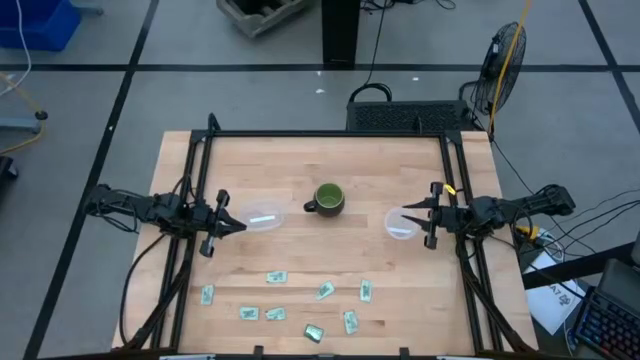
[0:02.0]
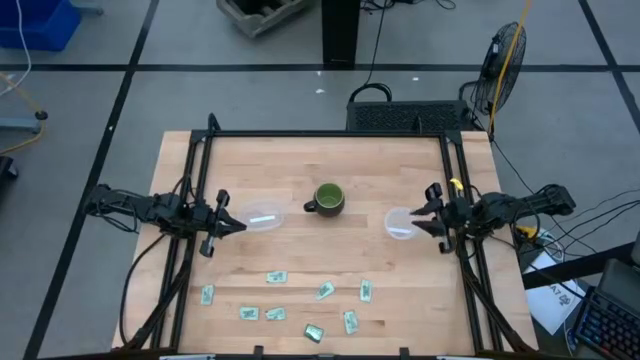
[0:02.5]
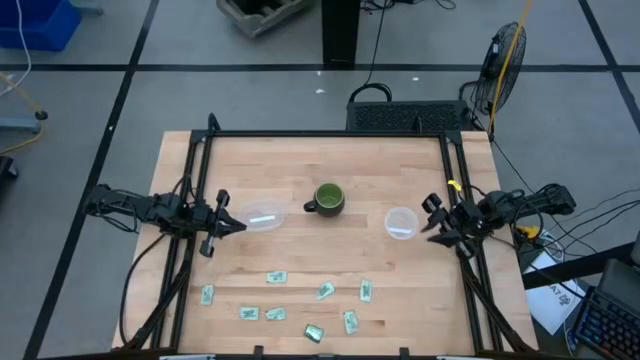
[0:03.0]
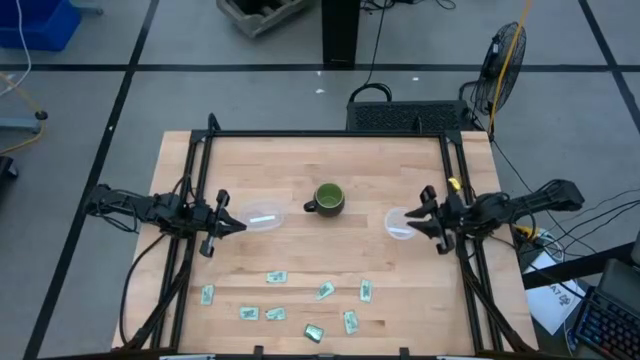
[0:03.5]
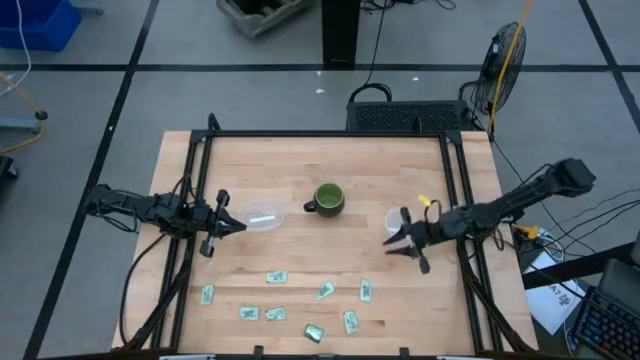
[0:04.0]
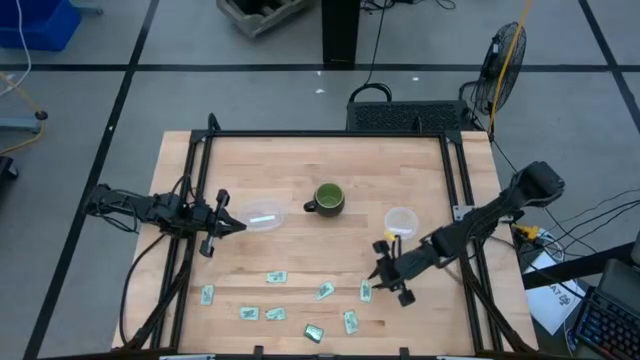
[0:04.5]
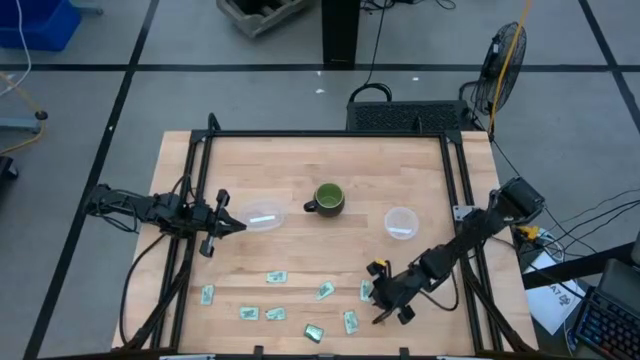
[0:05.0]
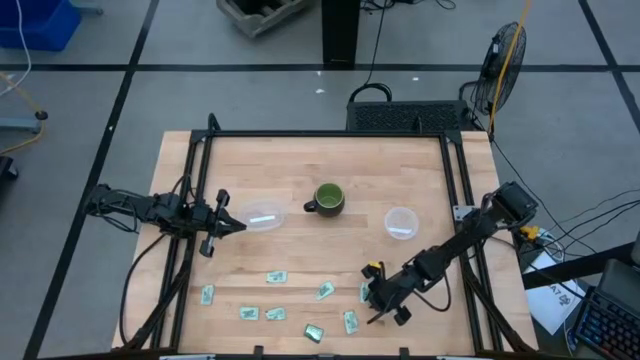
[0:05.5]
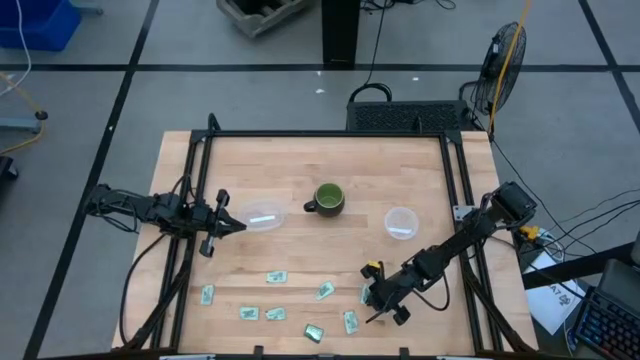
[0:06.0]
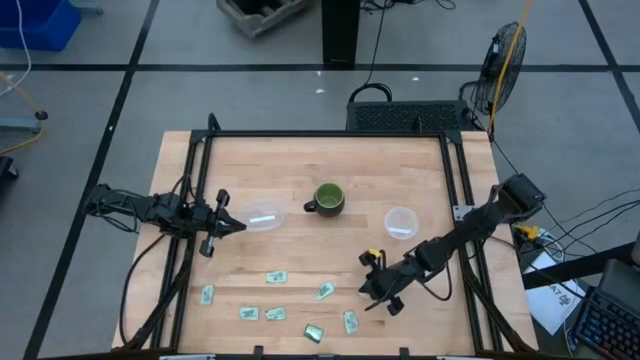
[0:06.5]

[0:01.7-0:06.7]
Task: Pick and place Stevia / Truvia into bins
Put the stevia packet into the round transparent container

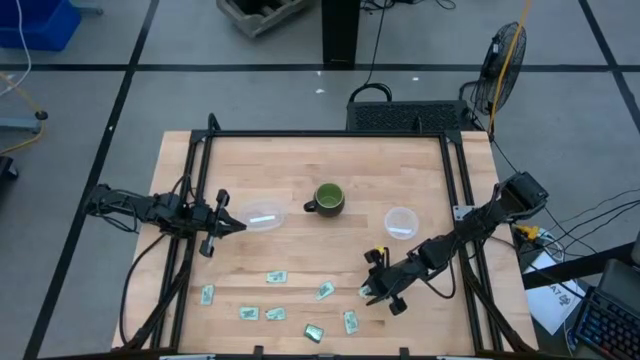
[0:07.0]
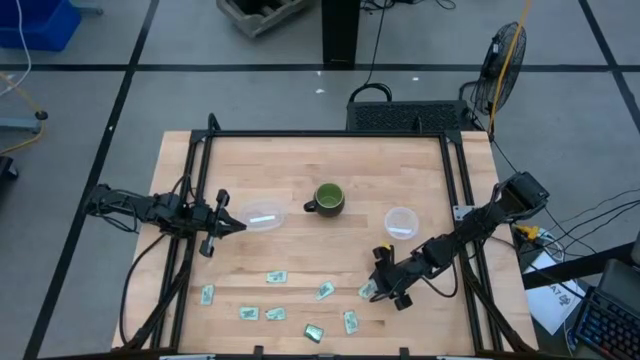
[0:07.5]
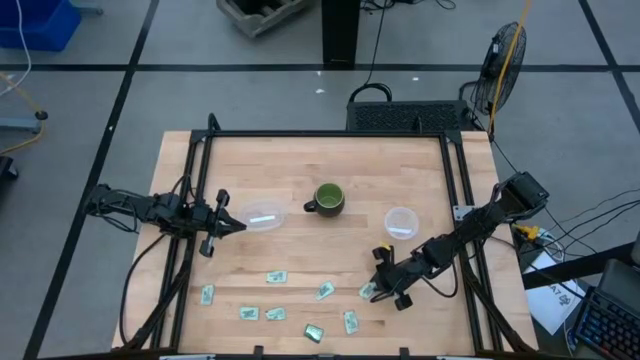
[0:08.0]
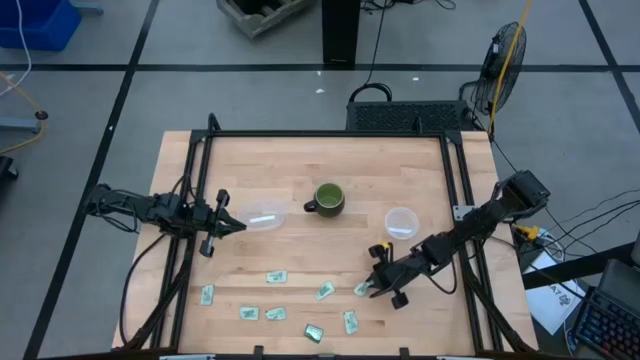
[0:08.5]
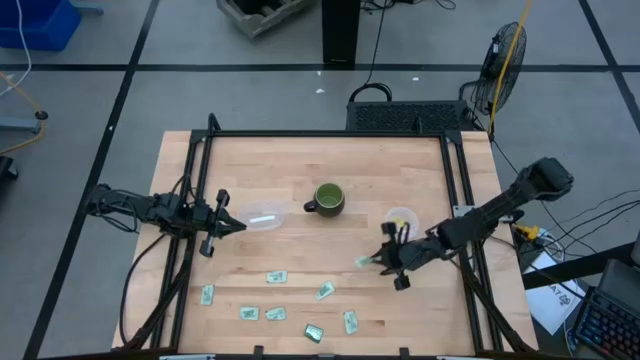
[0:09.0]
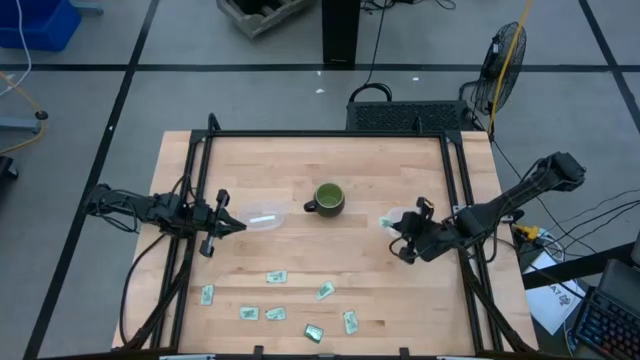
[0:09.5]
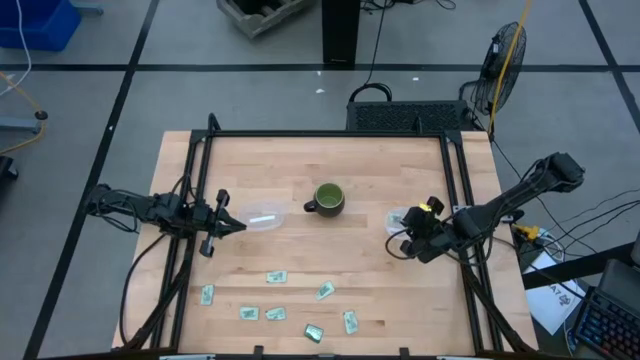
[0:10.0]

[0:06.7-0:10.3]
Put the stevia packet into the round transparent container

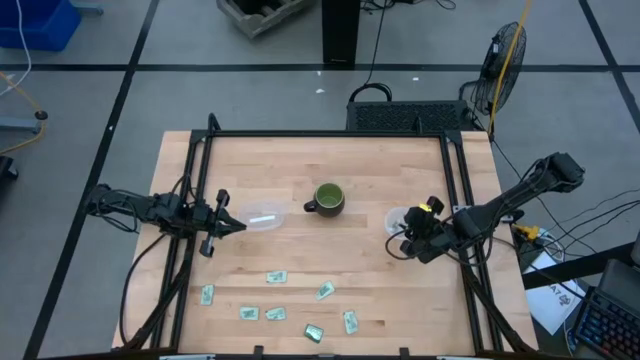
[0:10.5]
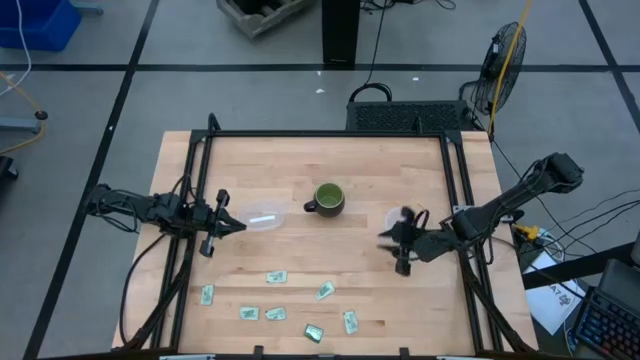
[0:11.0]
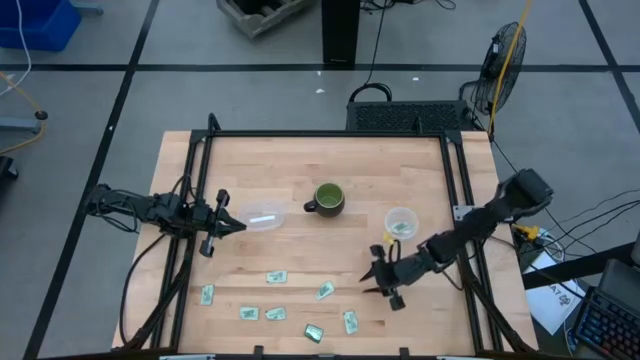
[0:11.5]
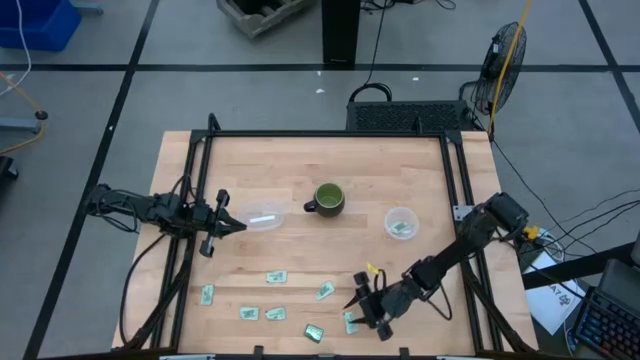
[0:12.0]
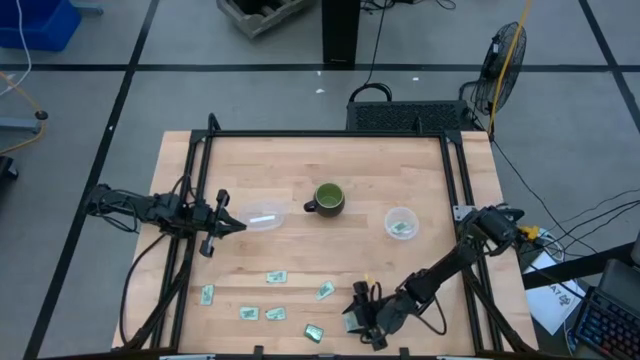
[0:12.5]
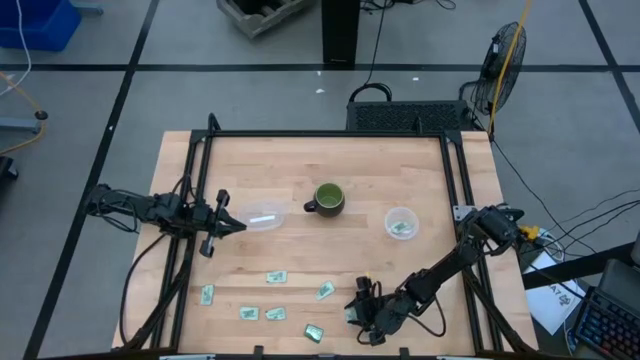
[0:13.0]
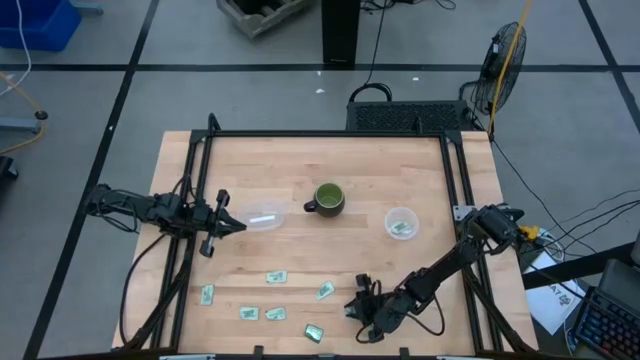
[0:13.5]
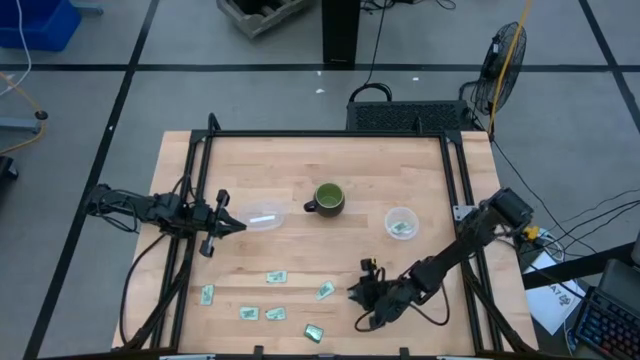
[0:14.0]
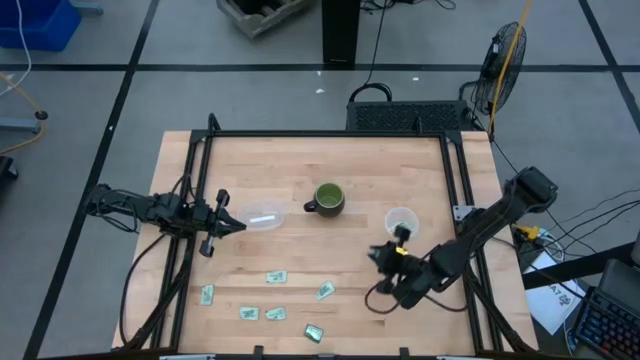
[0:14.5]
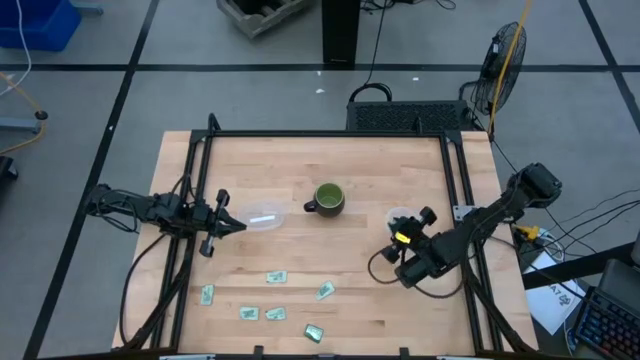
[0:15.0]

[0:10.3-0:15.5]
Put the stevia packet into the round transparent container

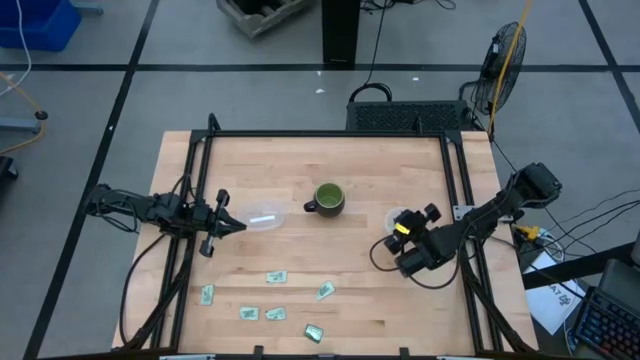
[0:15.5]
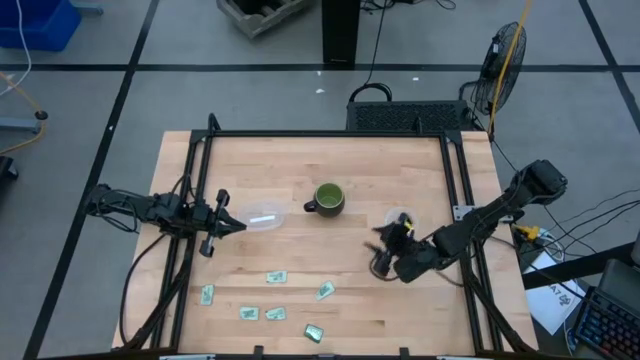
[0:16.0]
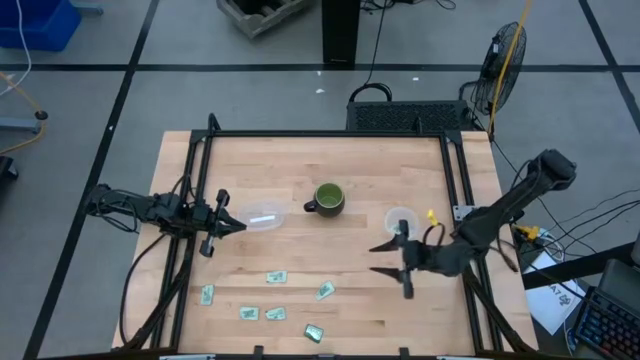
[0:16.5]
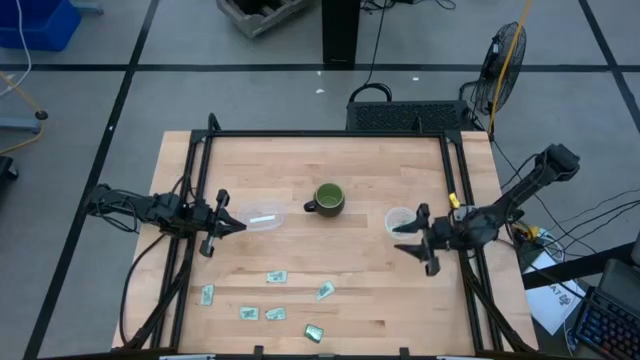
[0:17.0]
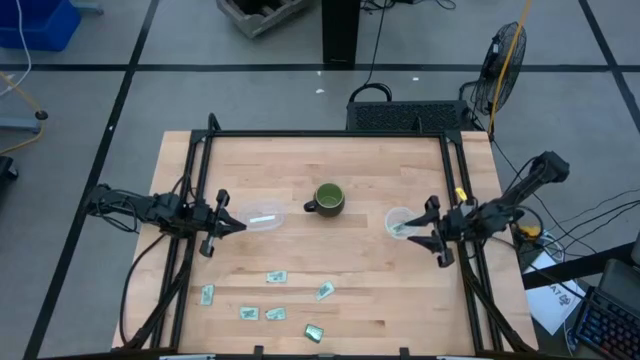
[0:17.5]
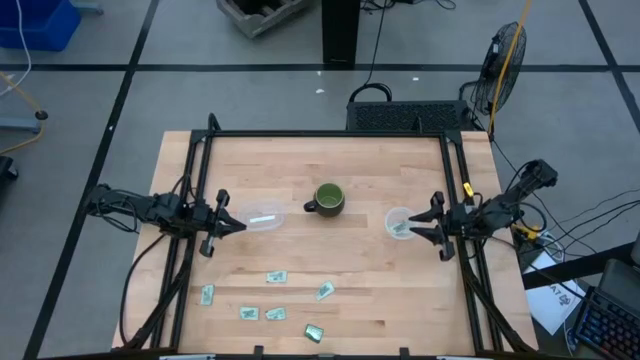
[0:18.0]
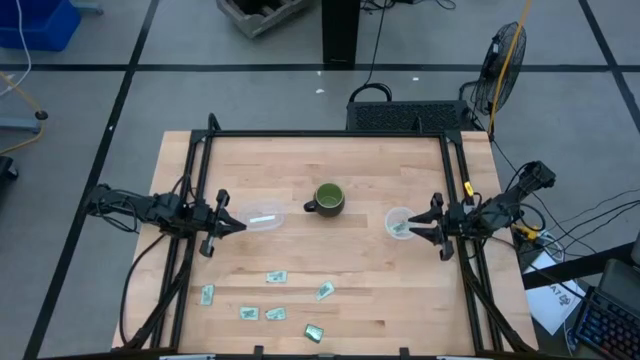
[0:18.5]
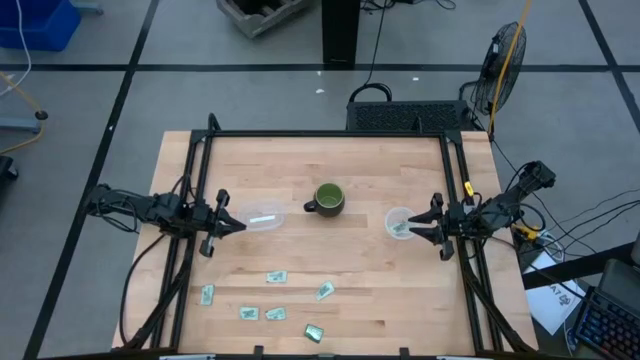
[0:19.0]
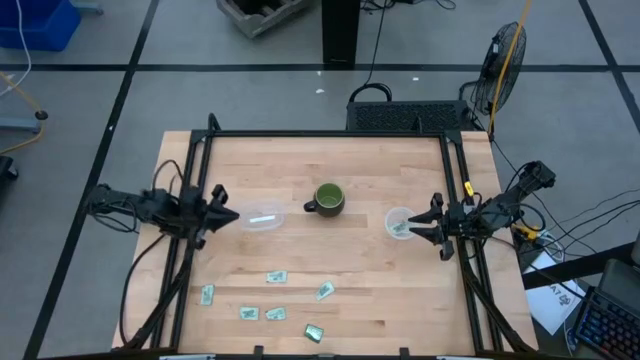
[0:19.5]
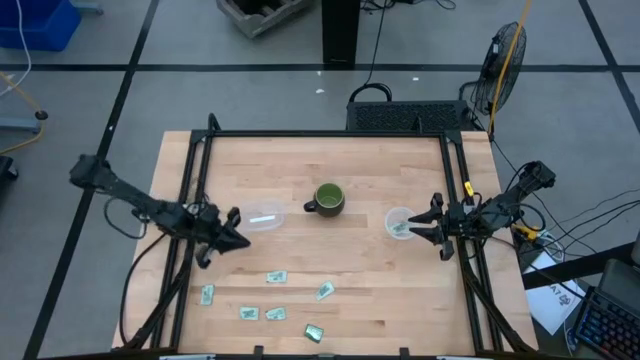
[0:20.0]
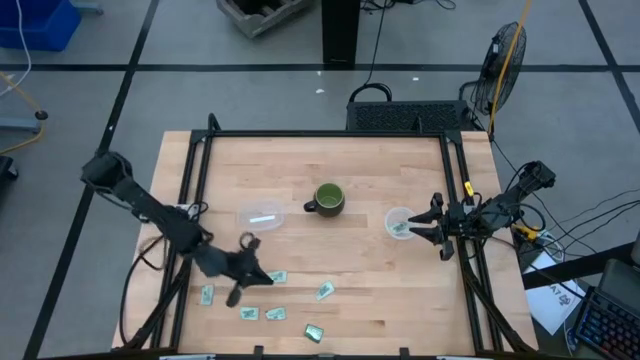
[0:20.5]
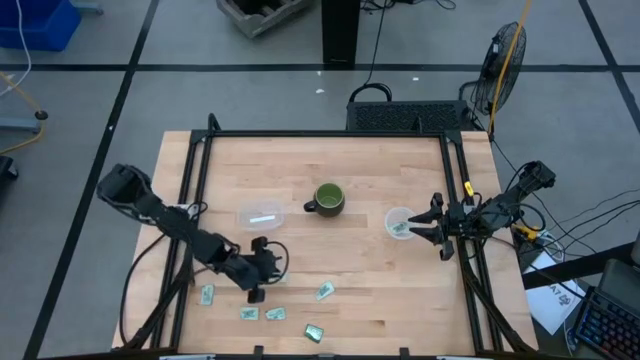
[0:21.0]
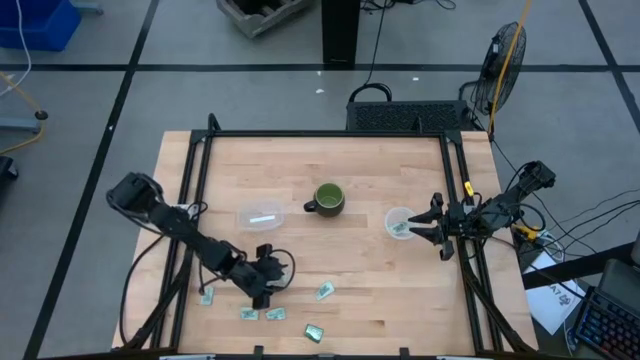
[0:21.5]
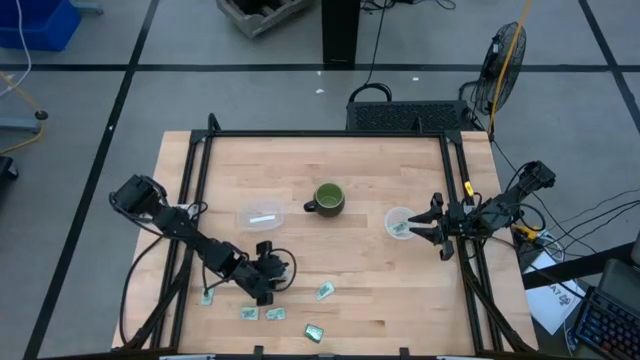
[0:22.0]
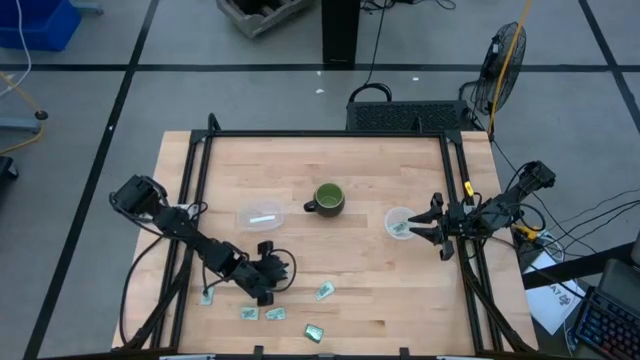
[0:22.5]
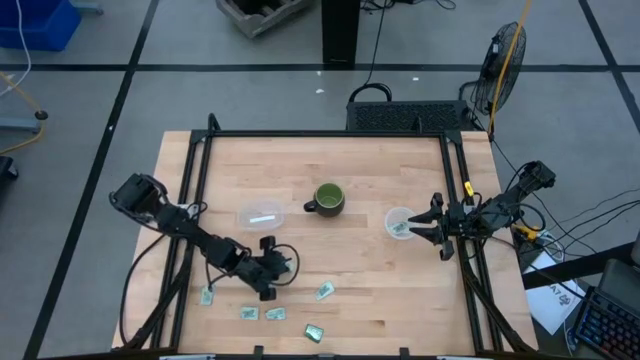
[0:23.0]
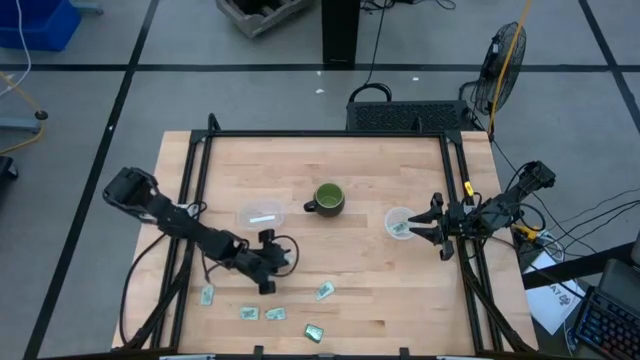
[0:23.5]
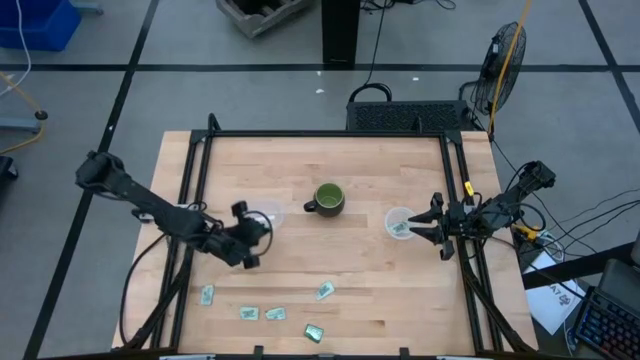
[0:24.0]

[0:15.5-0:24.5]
Put the stevia packet into the oval transparent container
